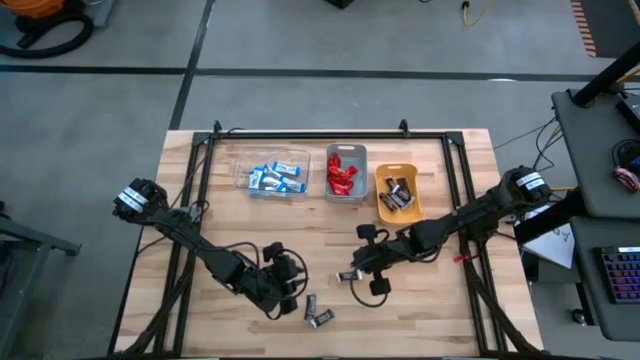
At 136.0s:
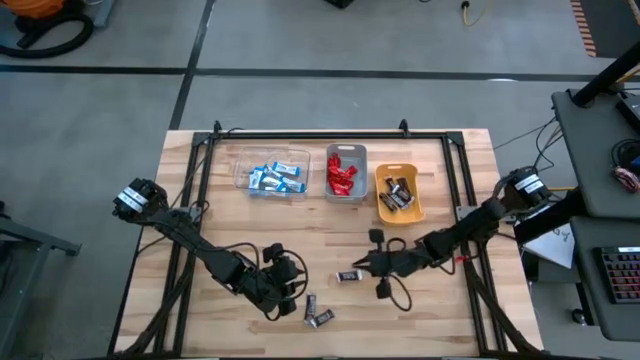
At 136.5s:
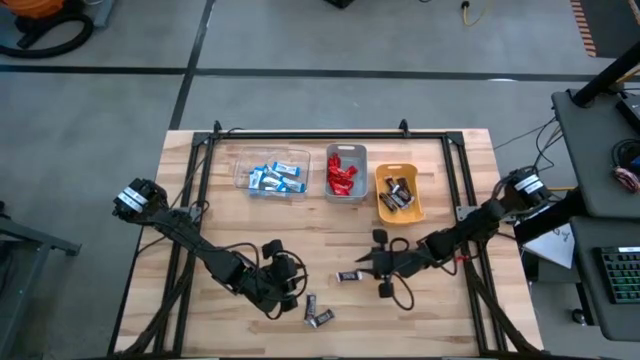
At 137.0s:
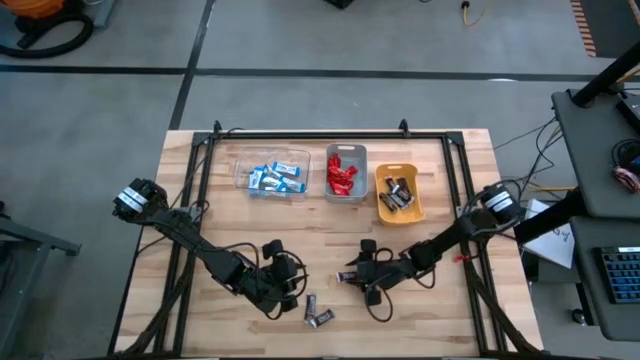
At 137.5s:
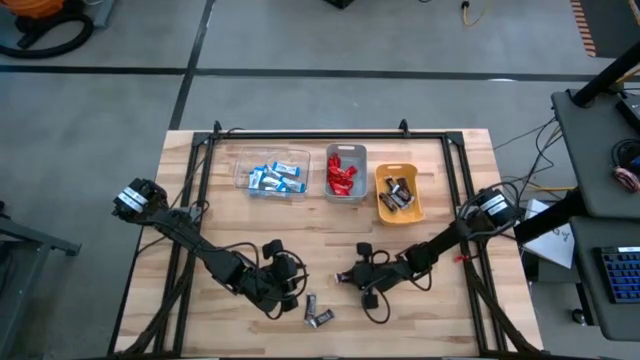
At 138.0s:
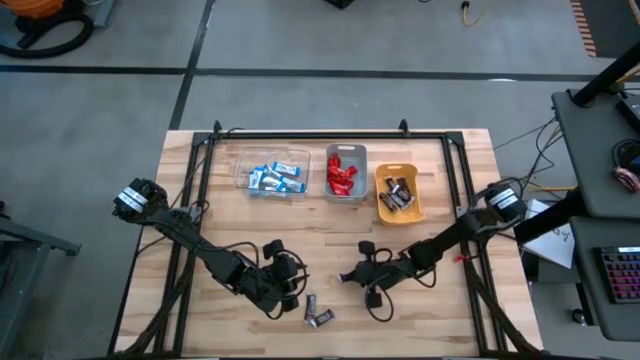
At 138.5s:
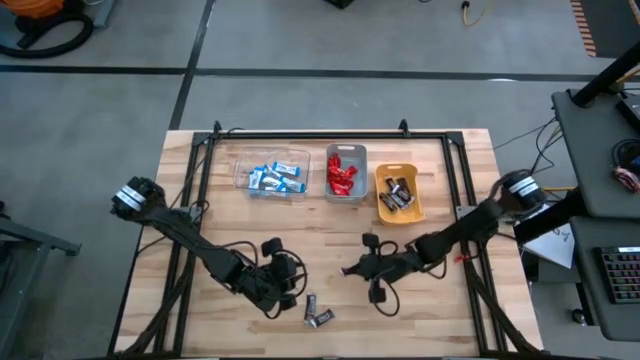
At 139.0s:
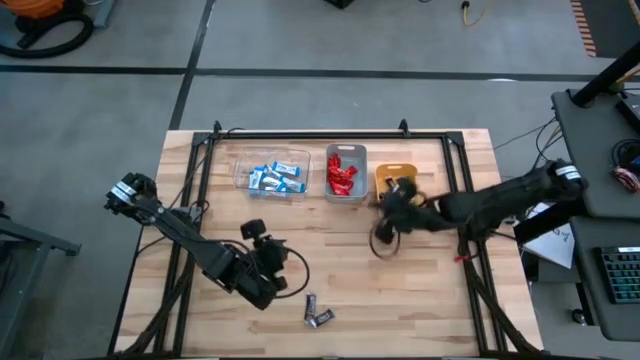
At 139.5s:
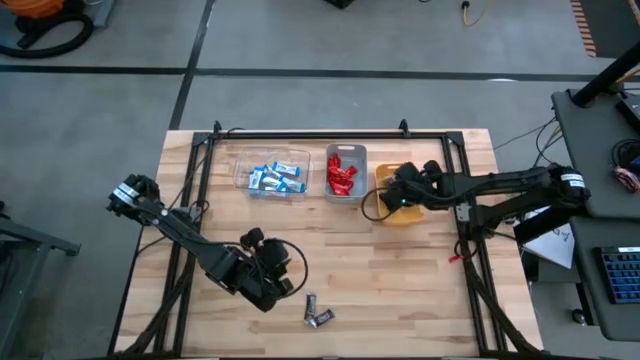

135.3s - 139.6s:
Task: Organize candy in baskets
Put the brown chocolate into the yellow bin

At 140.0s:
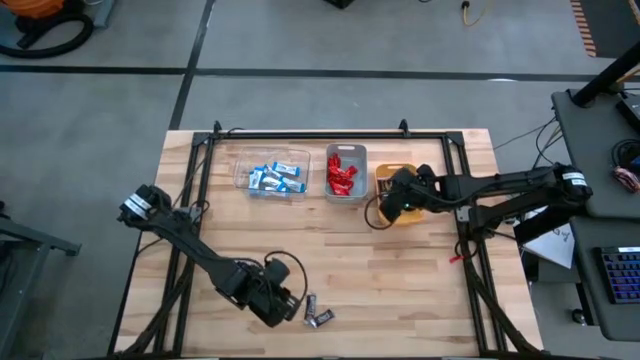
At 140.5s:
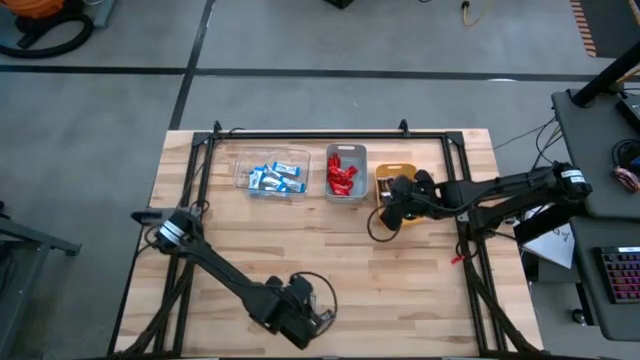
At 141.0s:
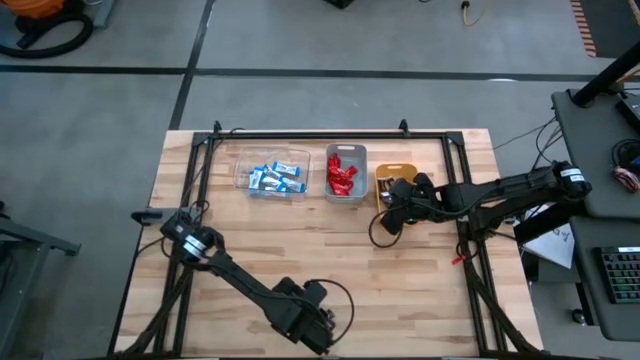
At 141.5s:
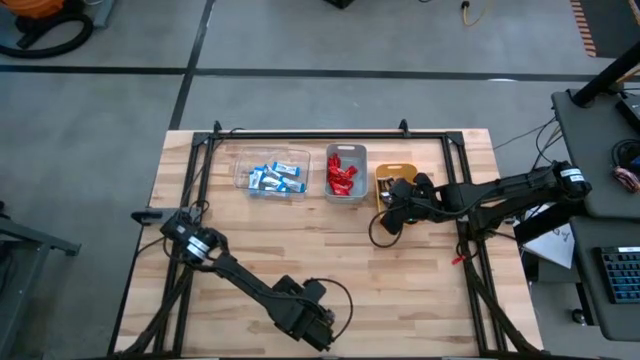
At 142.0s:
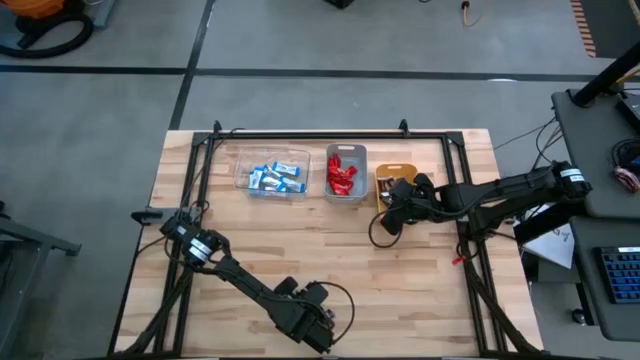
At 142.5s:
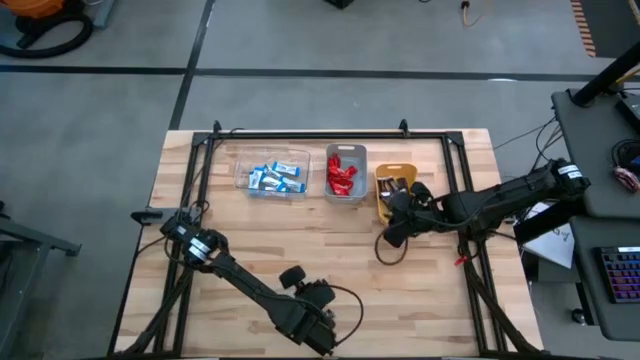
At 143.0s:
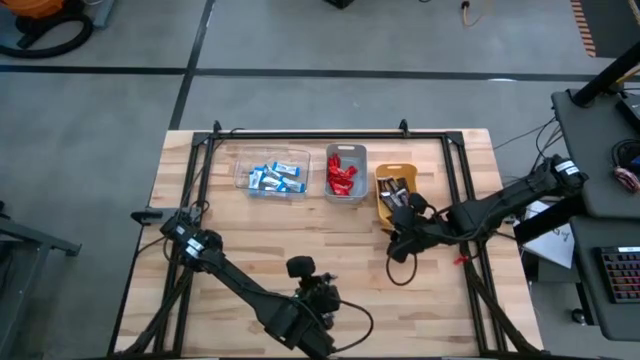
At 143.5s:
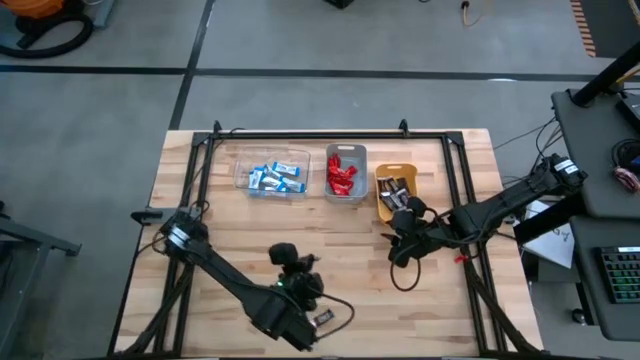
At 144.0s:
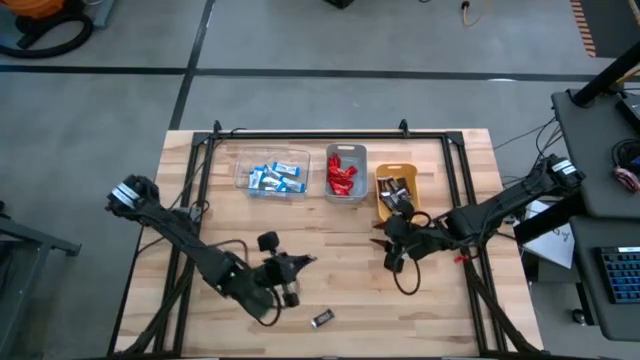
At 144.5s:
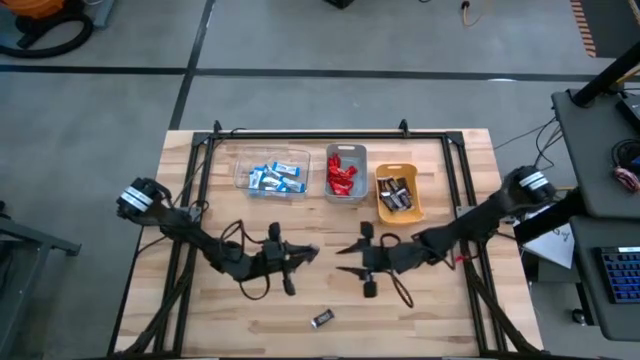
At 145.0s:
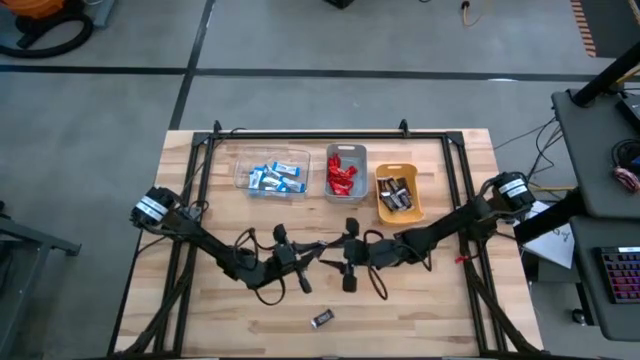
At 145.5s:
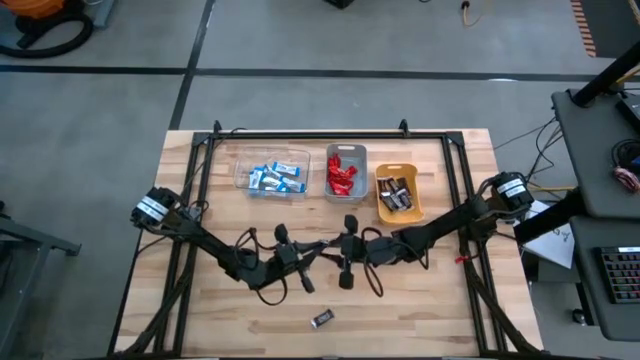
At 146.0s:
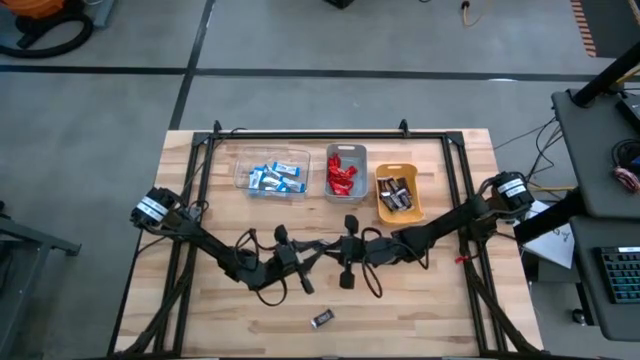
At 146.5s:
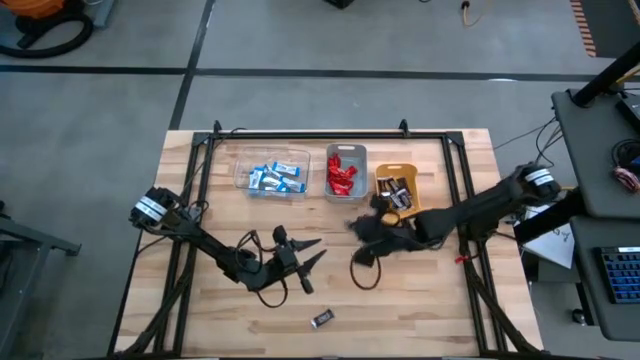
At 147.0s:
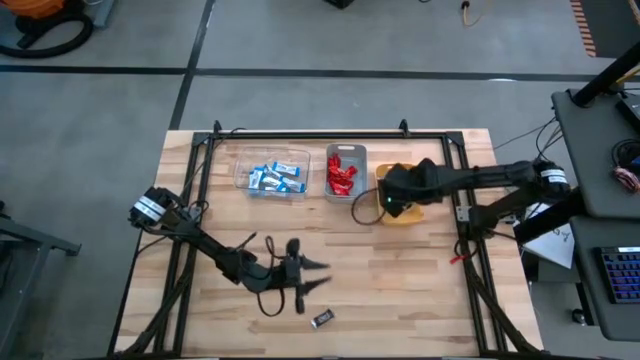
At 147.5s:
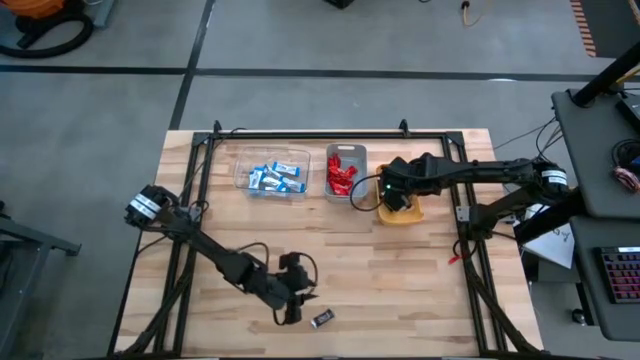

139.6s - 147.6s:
Put the brown chocolate into the yellow bin

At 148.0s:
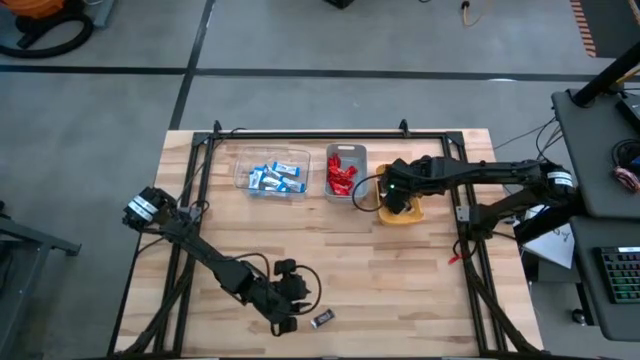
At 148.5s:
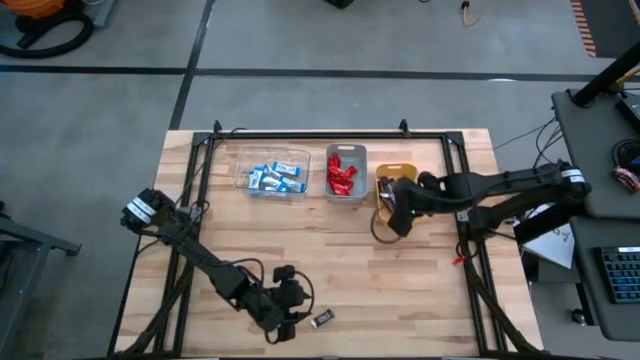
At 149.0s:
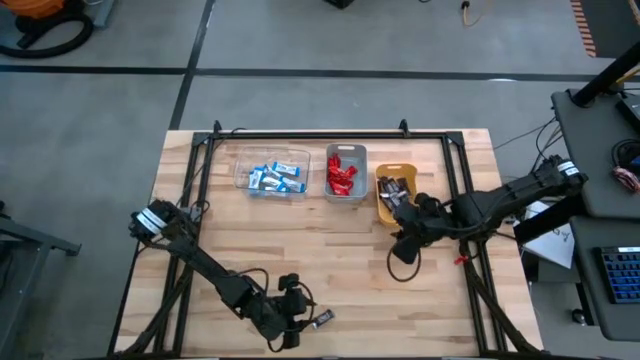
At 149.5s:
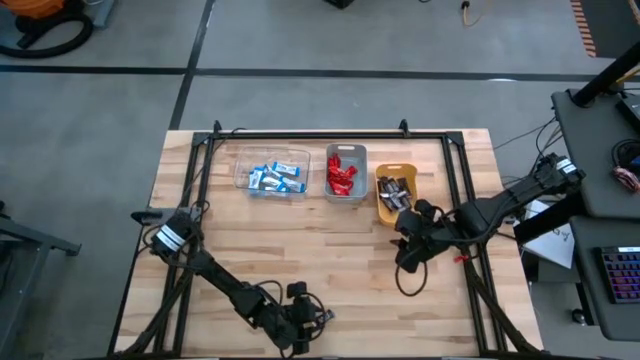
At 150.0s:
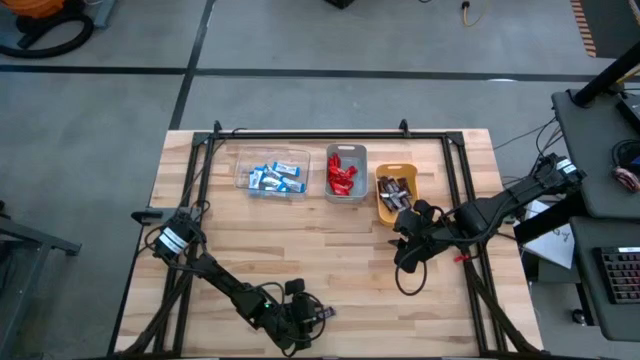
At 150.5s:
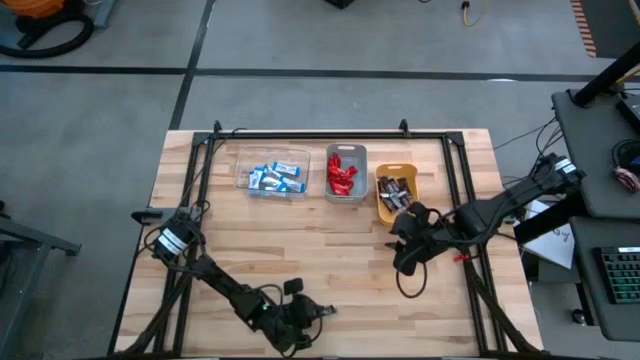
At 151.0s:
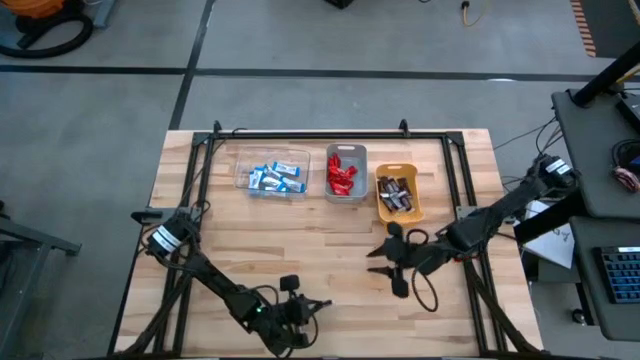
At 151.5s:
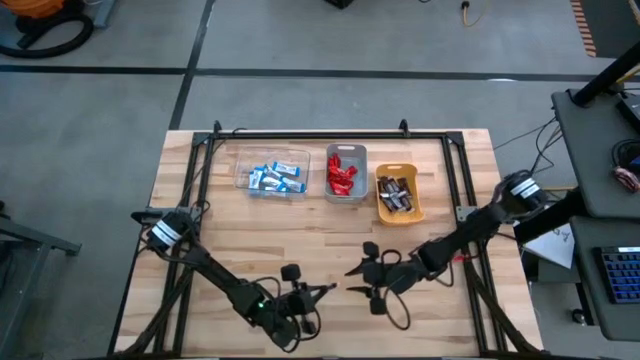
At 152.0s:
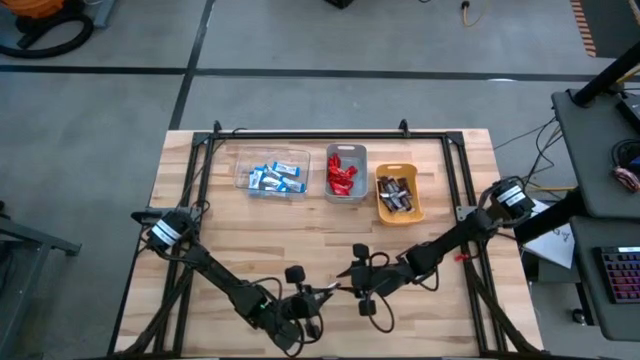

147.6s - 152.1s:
Put the brown chocolate into the yellow bin

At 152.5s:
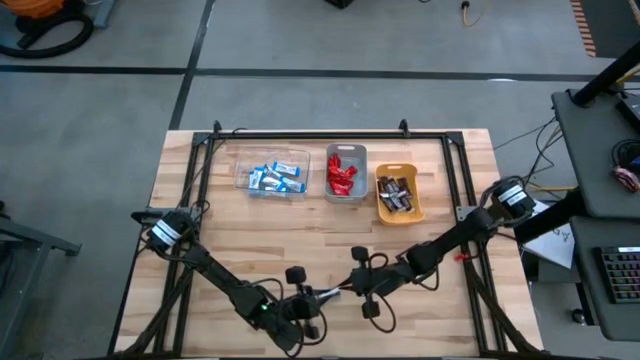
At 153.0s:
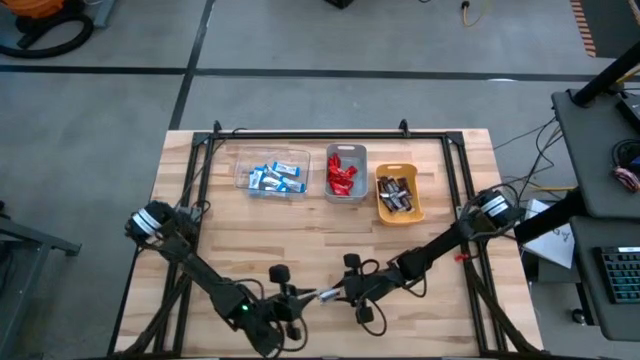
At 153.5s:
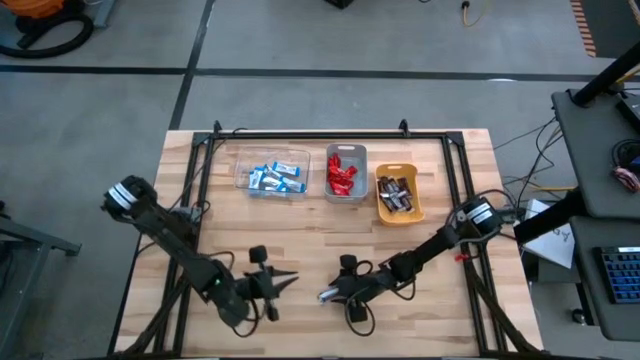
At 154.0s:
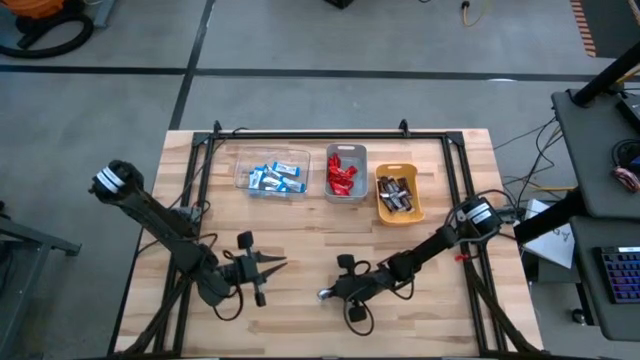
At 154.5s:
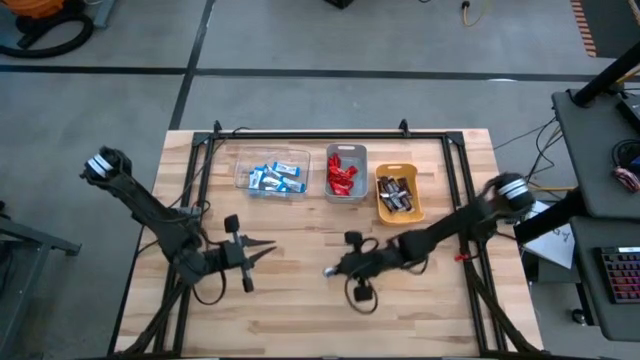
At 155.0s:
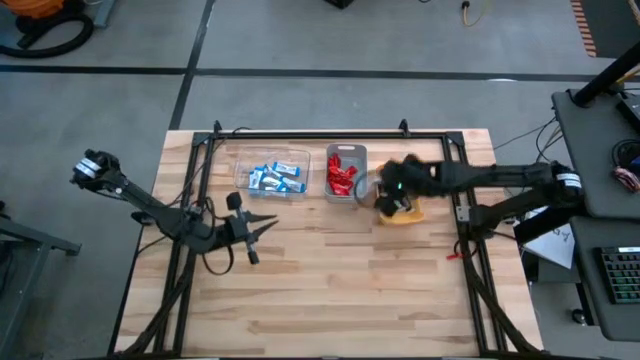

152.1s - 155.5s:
Put the brown chocolate into the yellow bin

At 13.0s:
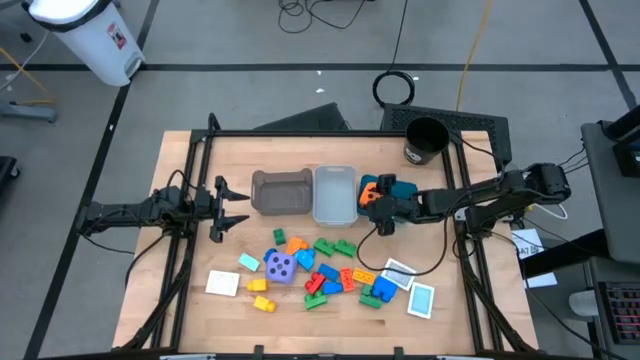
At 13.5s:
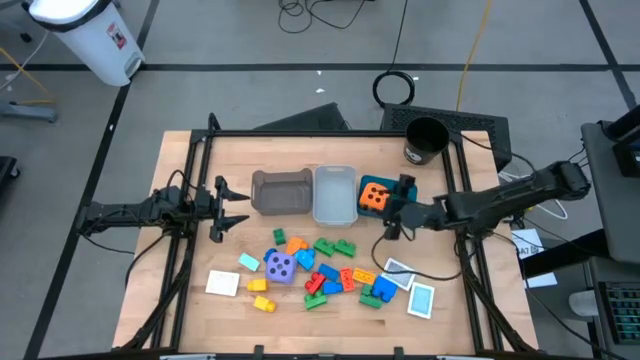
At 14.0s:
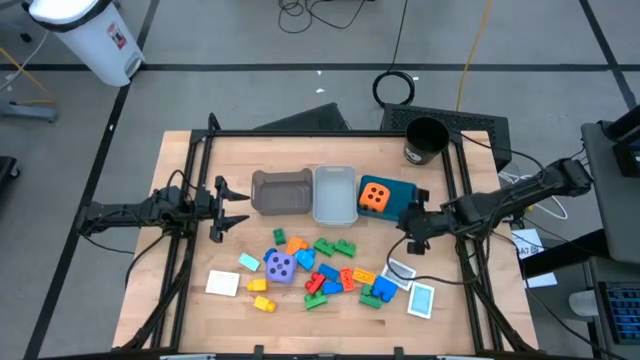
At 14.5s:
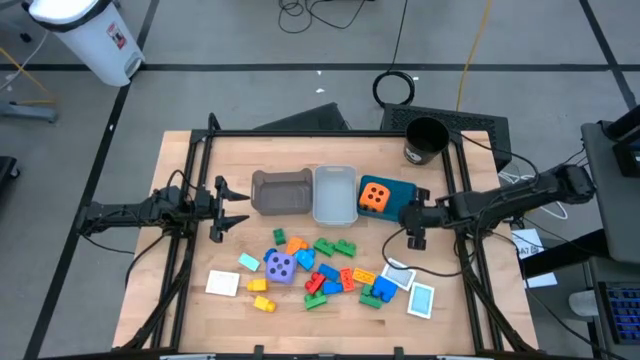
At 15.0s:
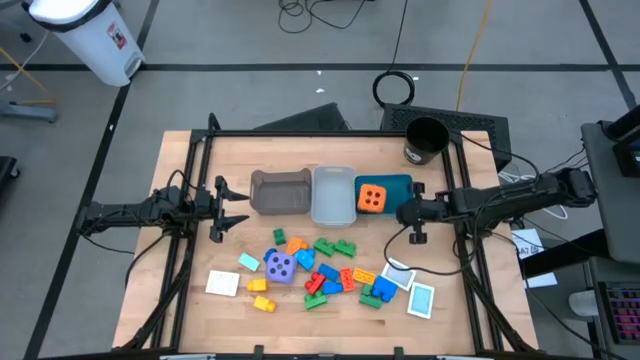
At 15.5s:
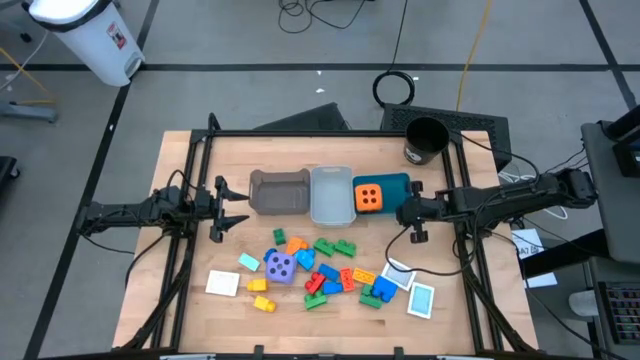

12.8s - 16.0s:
Task: Pick & Place Toys
Adjust the blue bin on the table
